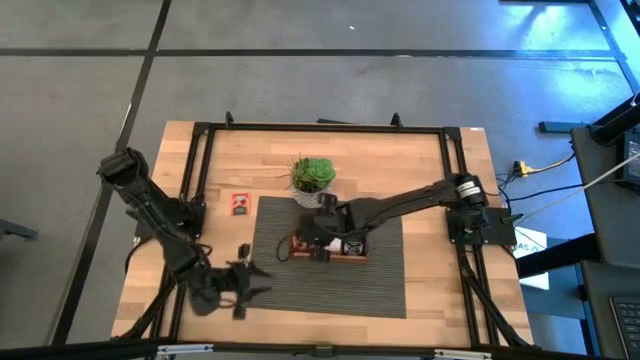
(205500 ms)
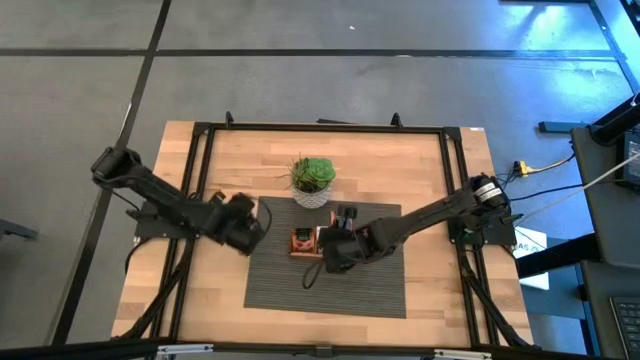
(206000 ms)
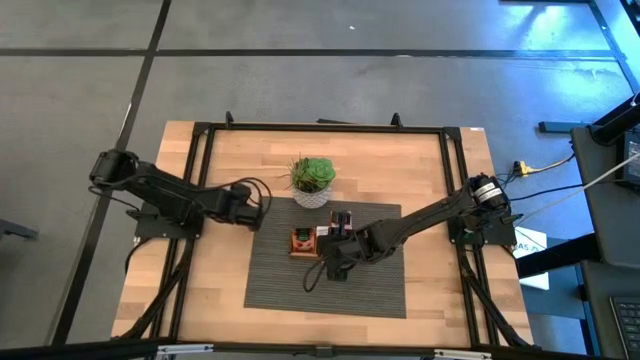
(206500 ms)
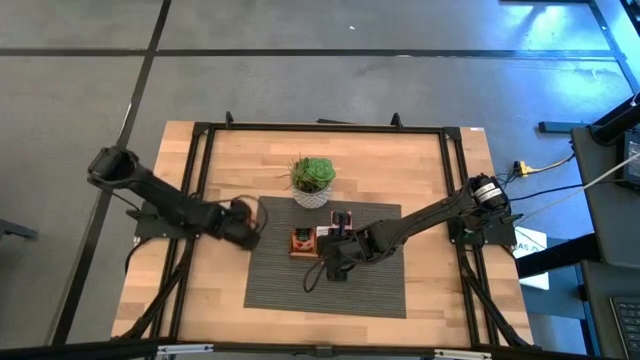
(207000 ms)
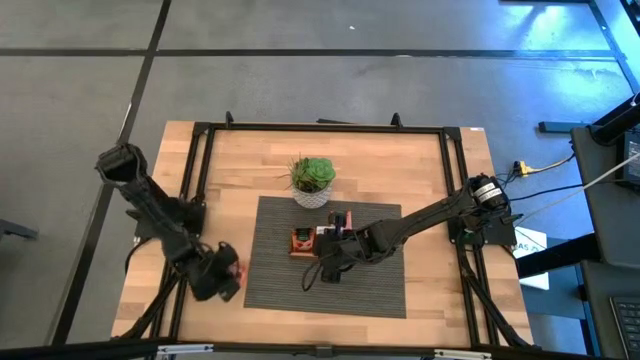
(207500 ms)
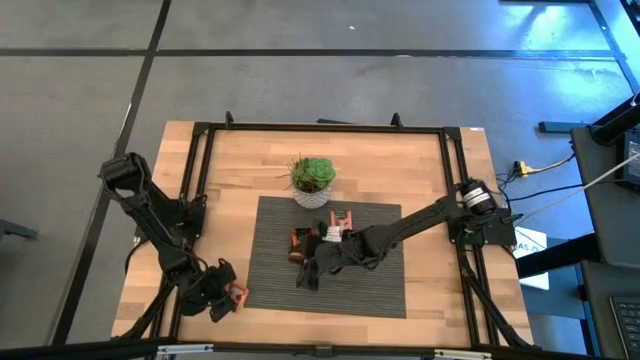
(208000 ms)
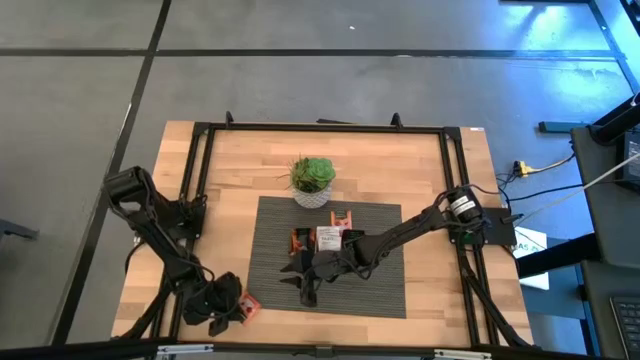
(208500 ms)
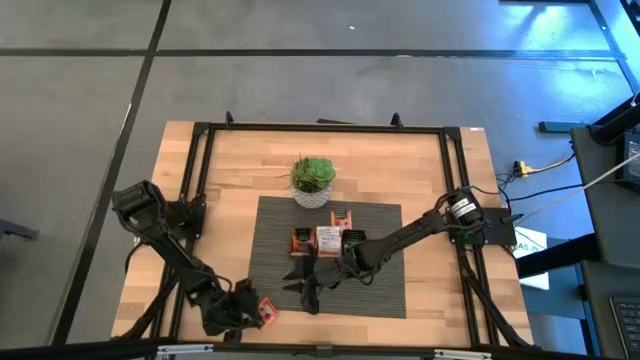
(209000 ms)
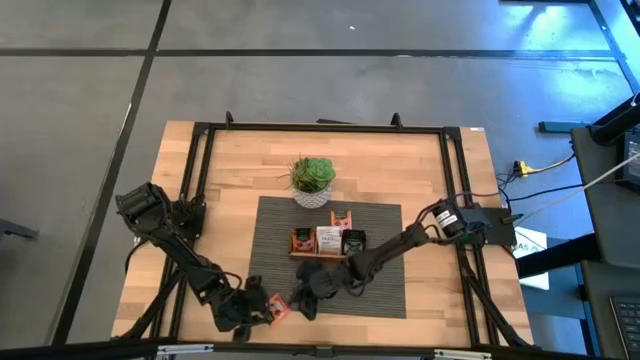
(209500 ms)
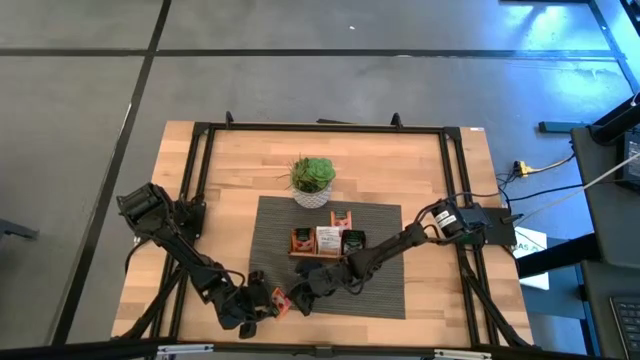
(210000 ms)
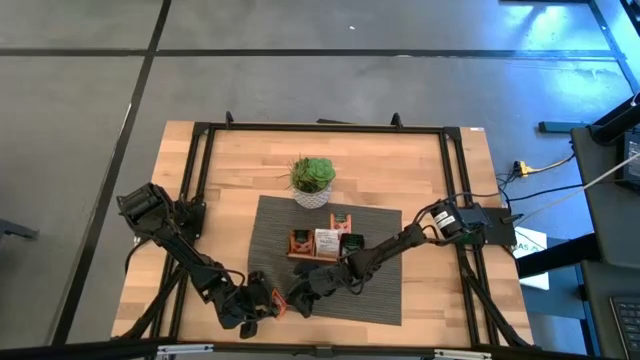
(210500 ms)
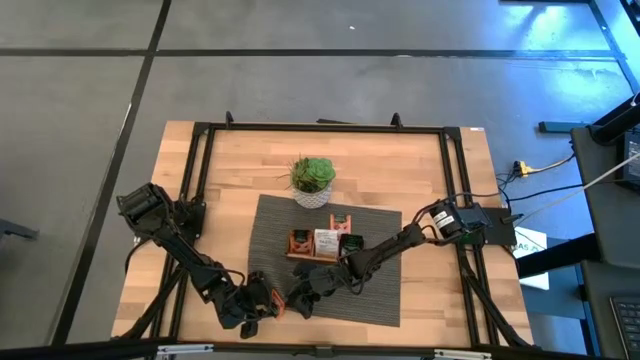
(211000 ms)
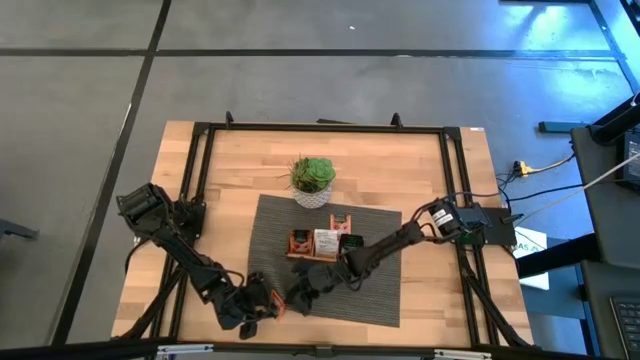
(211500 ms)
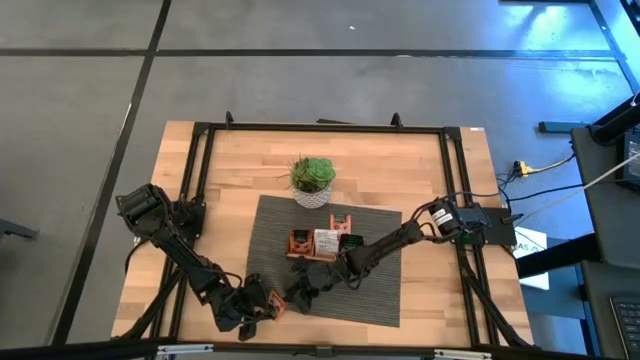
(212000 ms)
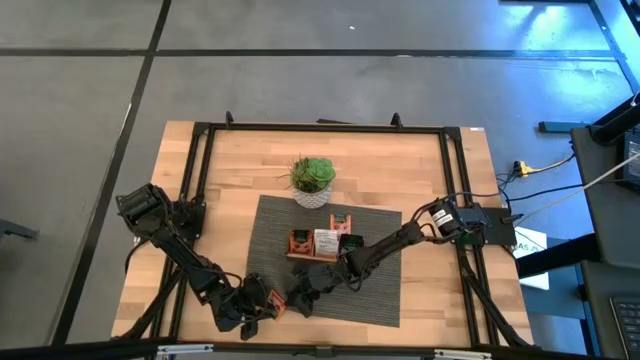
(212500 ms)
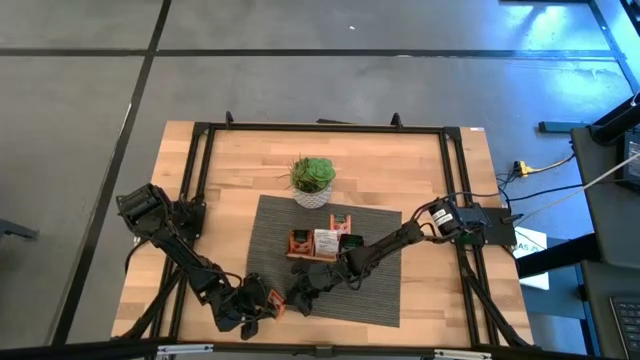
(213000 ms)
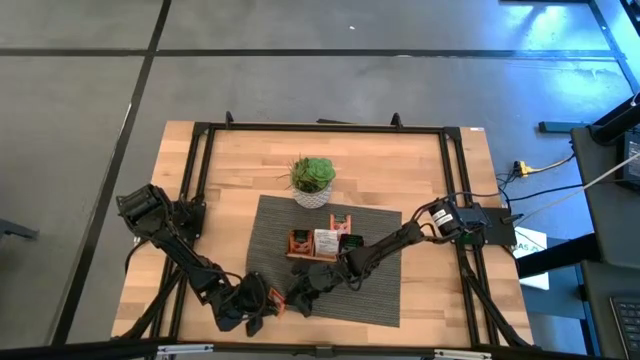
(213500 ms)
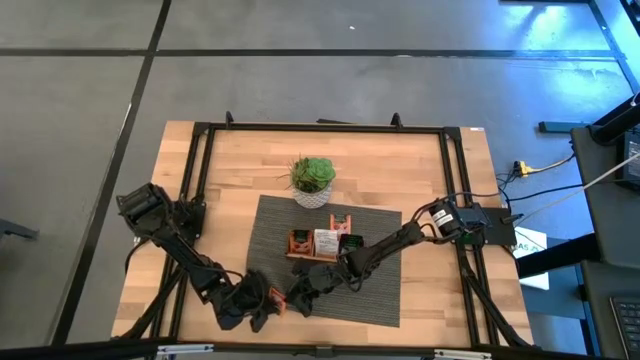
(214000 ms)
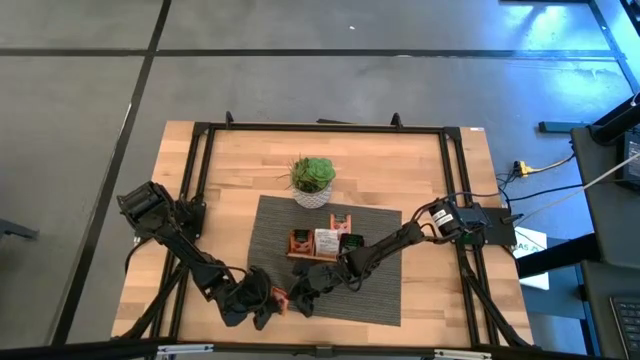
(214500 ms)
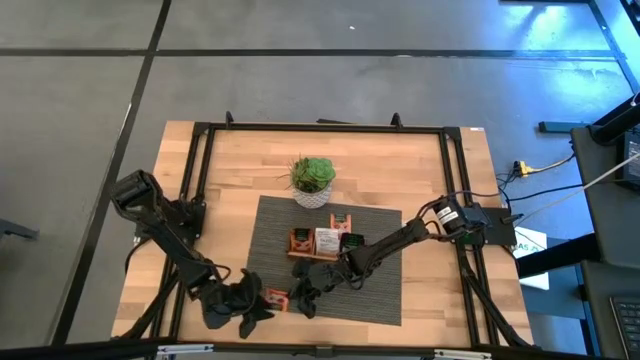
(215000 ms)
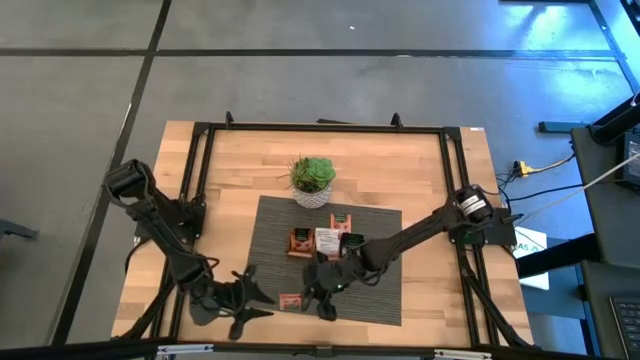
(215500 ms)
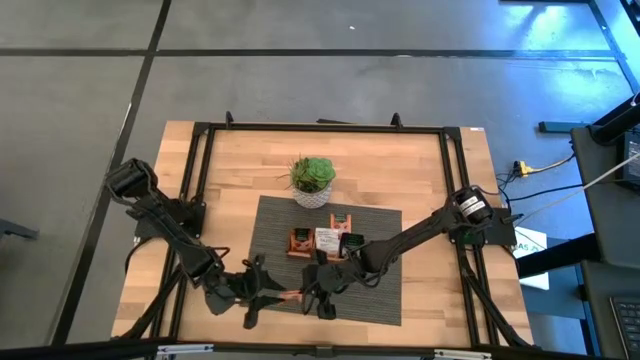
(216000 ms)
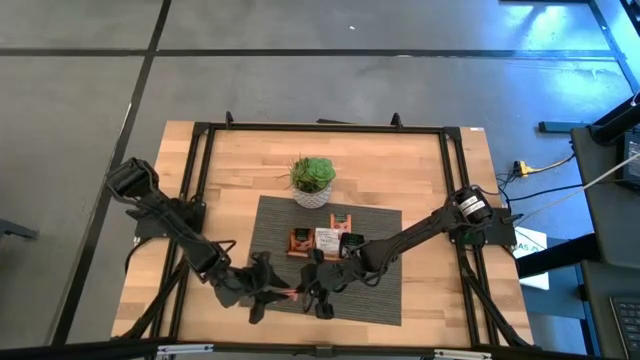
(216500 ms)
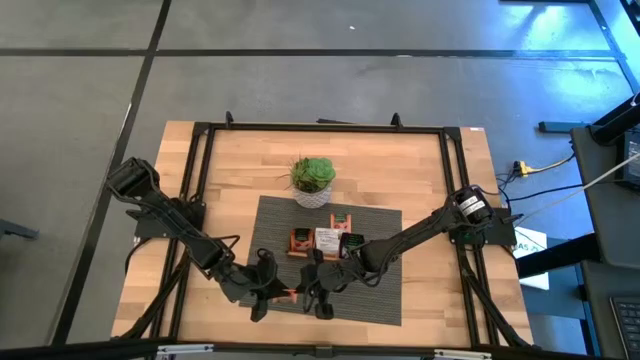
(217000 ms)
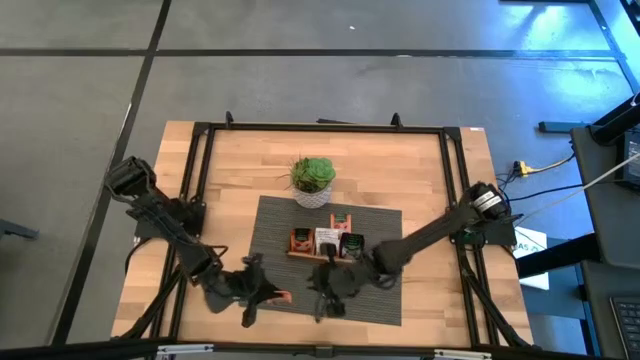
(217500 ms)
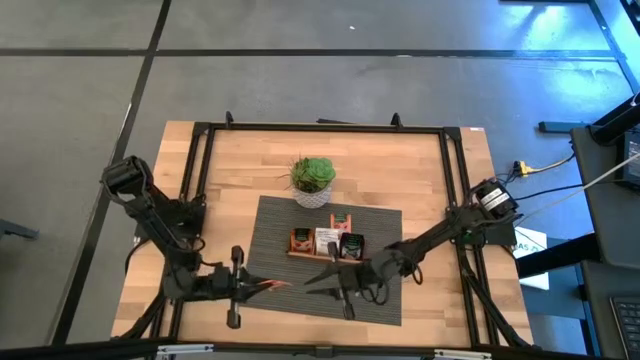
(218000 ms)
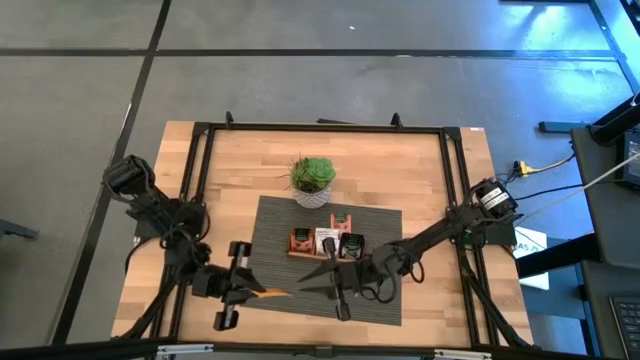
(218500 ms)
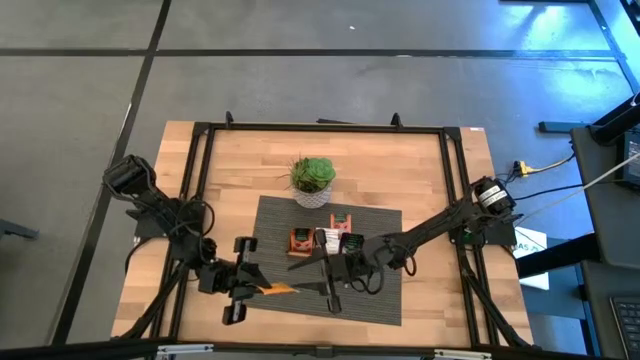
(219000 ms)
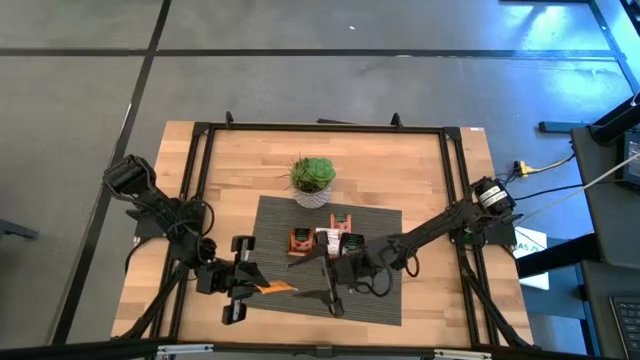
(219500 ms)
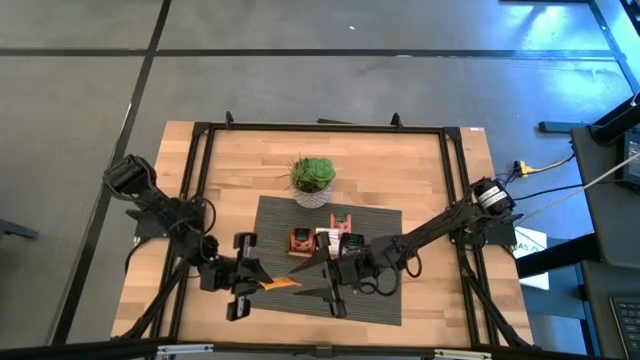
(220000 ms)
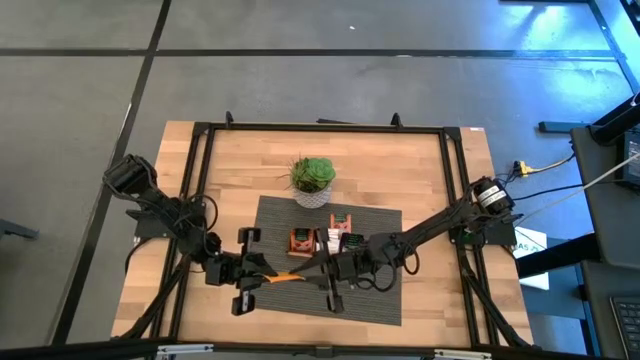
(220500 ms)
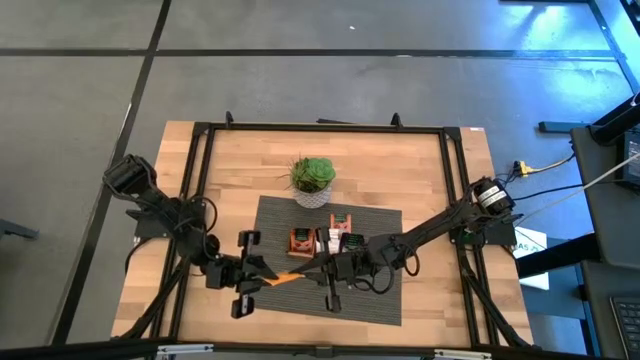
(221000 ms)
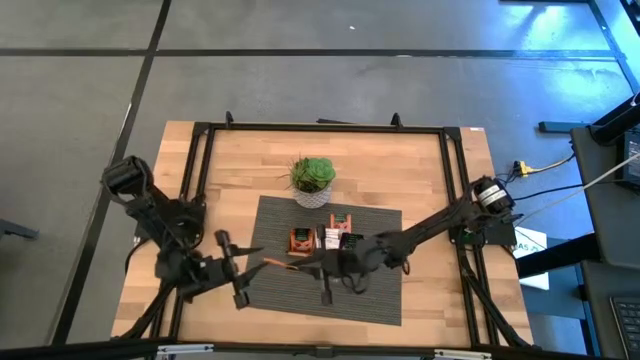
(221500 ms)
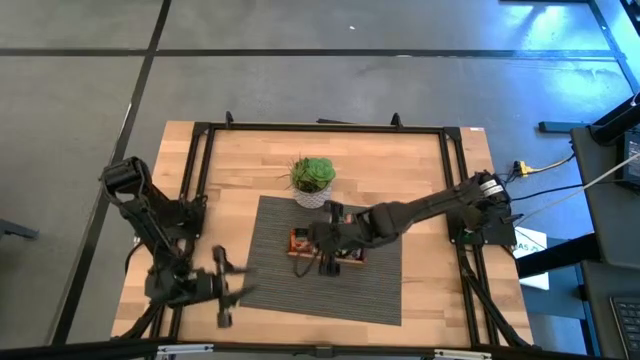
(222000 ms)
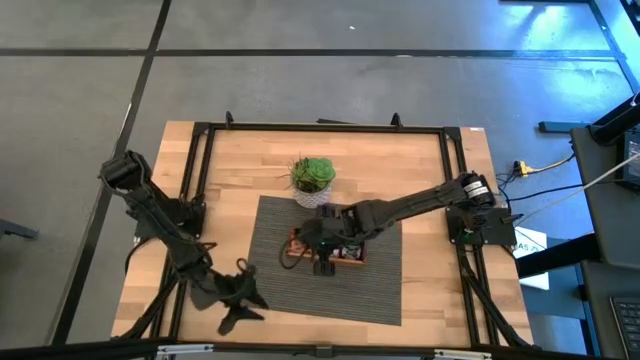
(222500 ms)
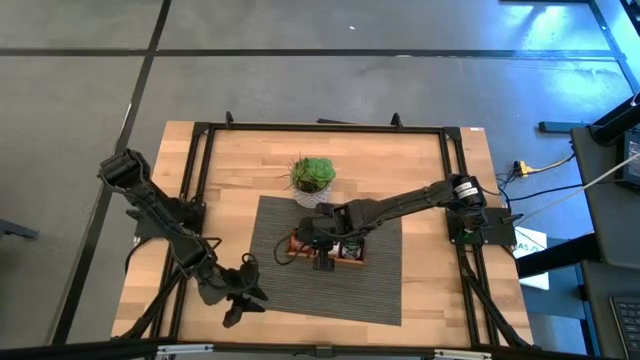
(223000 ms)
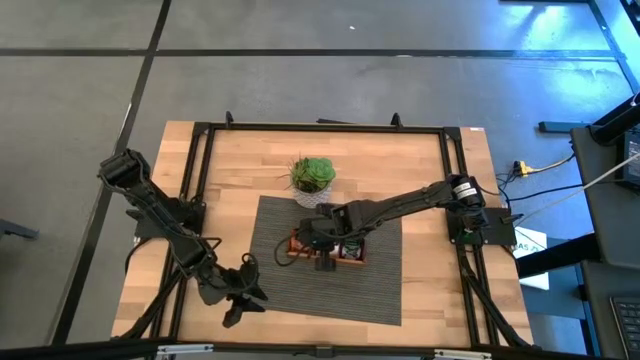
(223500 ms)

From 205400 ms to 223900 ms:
Task: Pick & Place Tea
Put the orange tea bag into the left section of the wooden organizer
